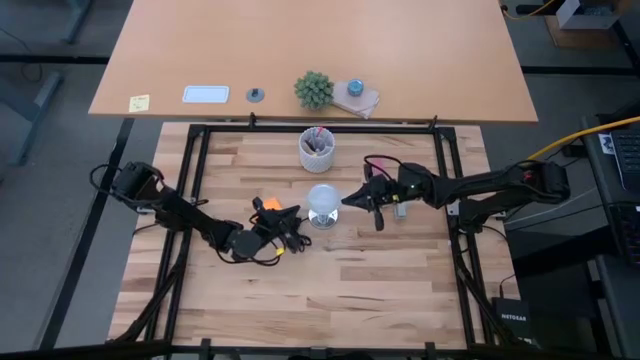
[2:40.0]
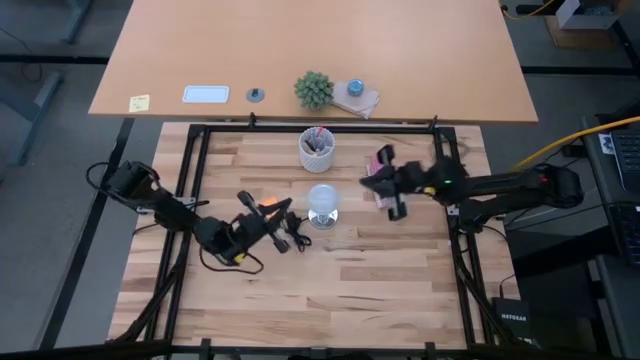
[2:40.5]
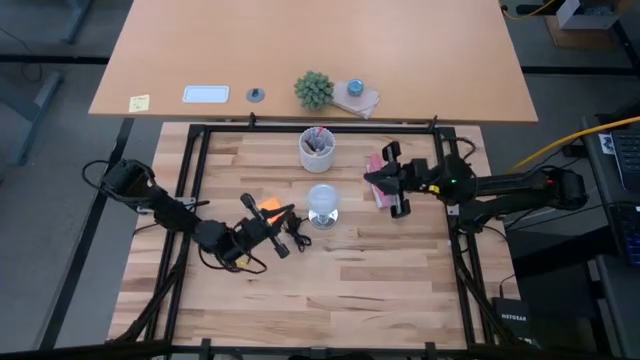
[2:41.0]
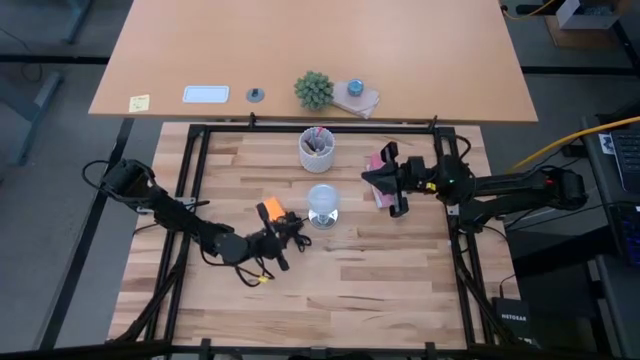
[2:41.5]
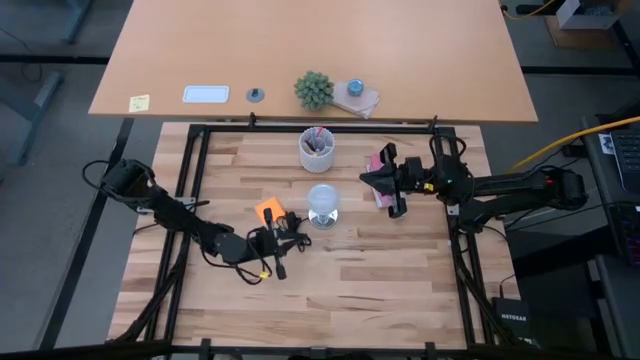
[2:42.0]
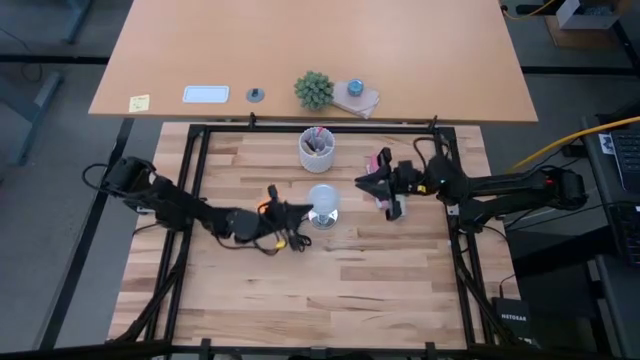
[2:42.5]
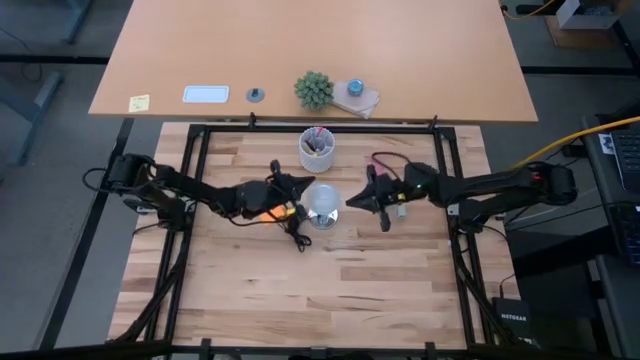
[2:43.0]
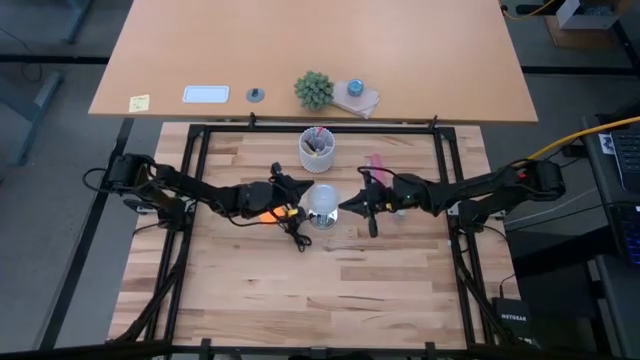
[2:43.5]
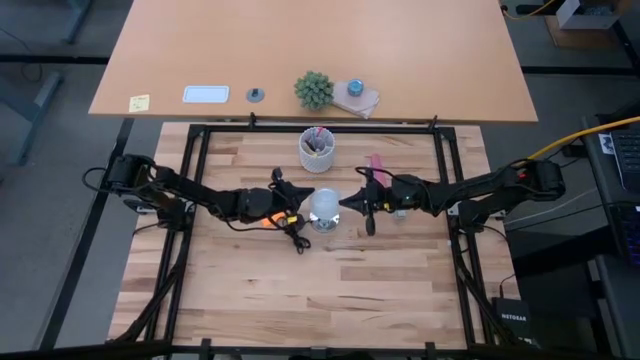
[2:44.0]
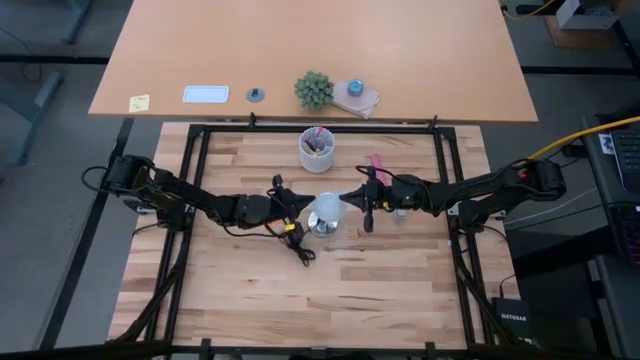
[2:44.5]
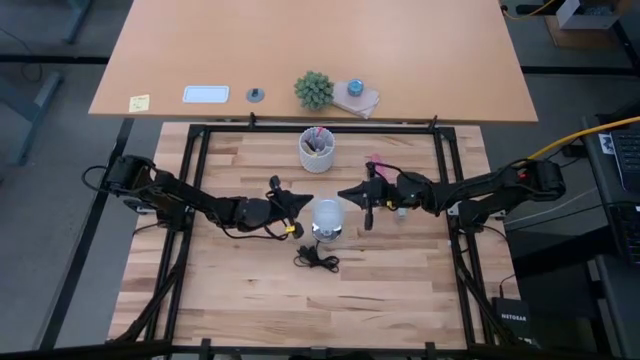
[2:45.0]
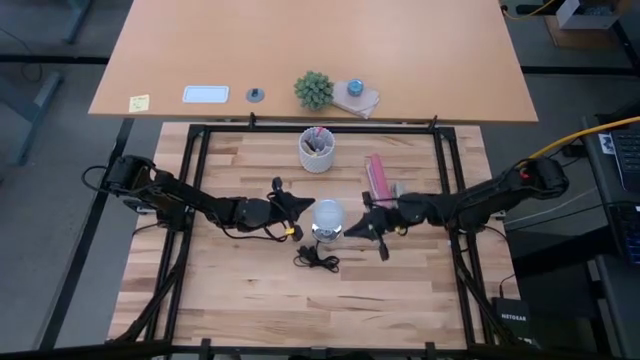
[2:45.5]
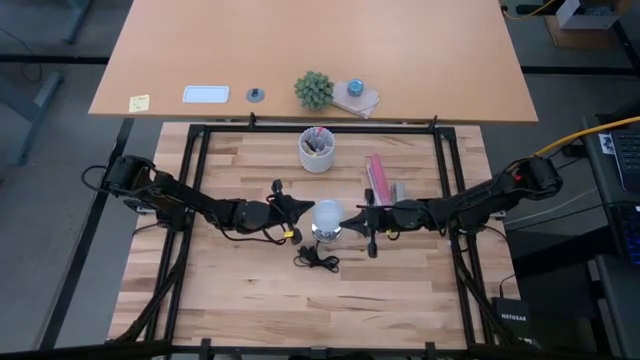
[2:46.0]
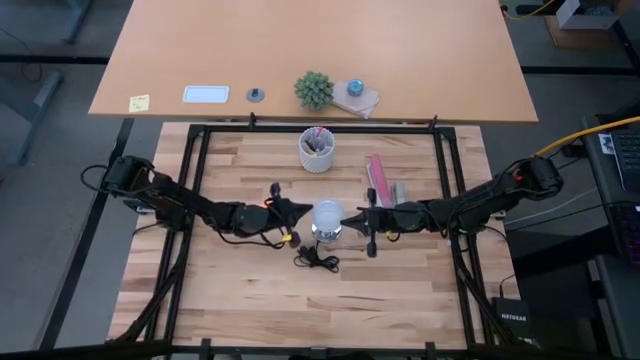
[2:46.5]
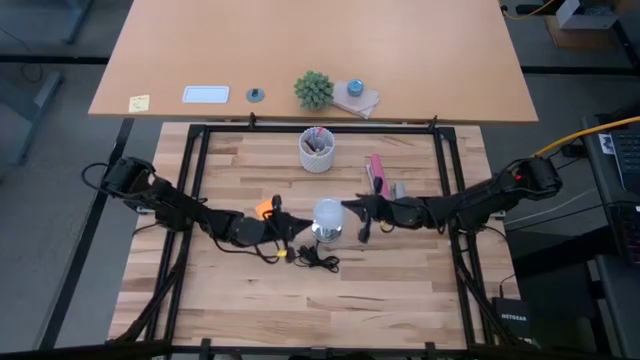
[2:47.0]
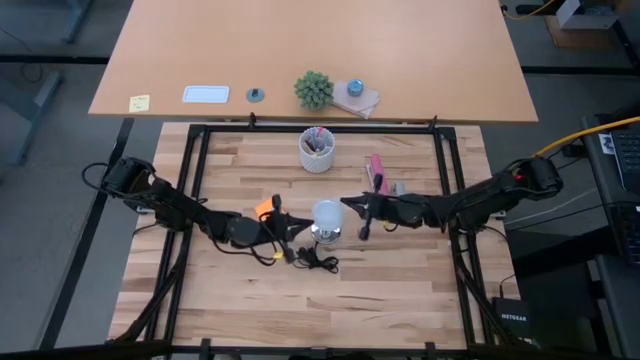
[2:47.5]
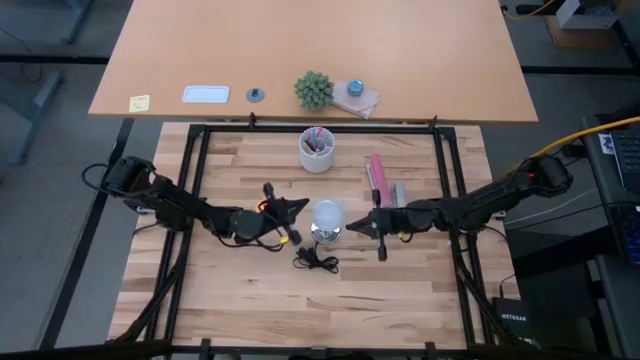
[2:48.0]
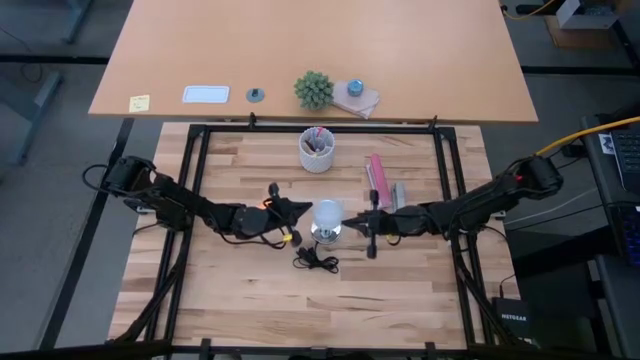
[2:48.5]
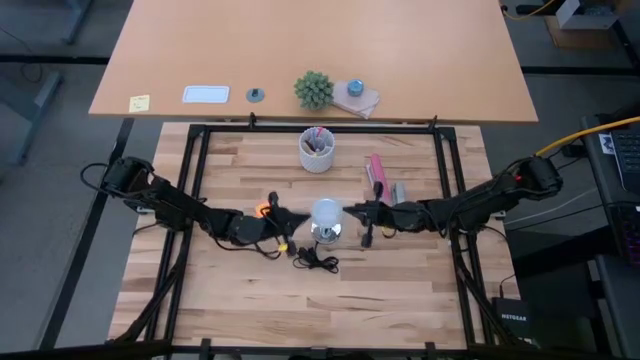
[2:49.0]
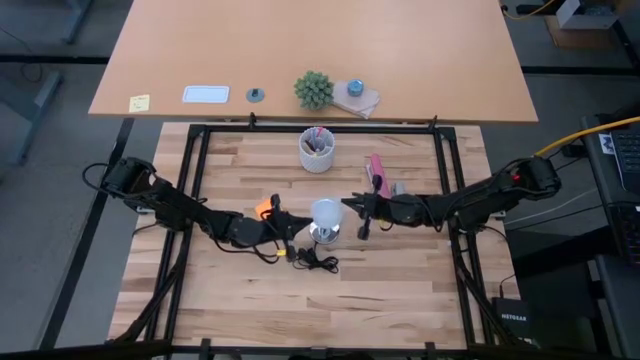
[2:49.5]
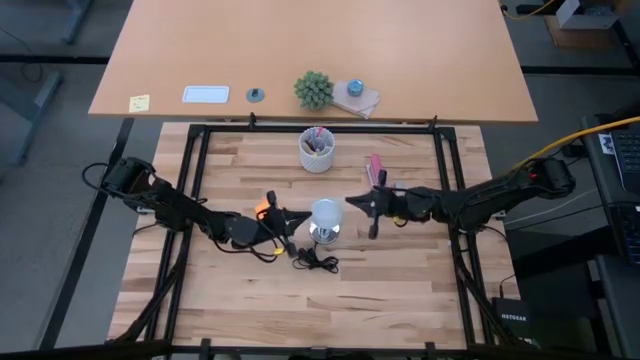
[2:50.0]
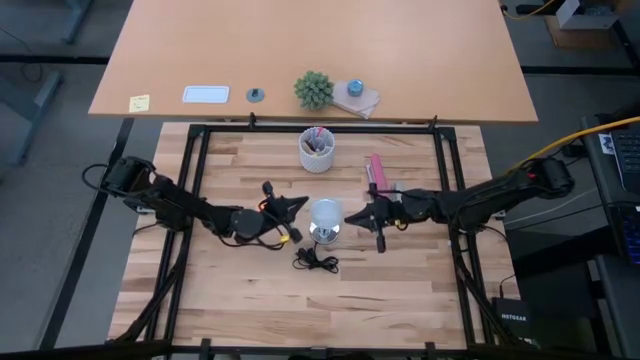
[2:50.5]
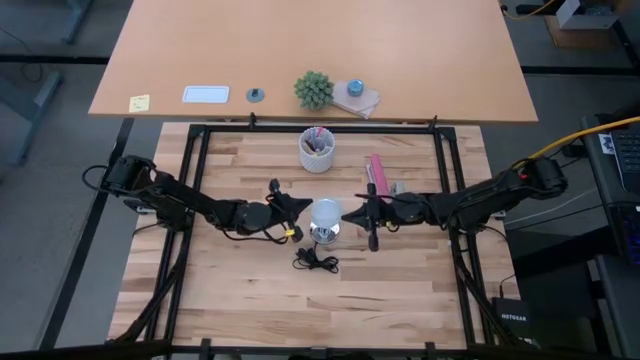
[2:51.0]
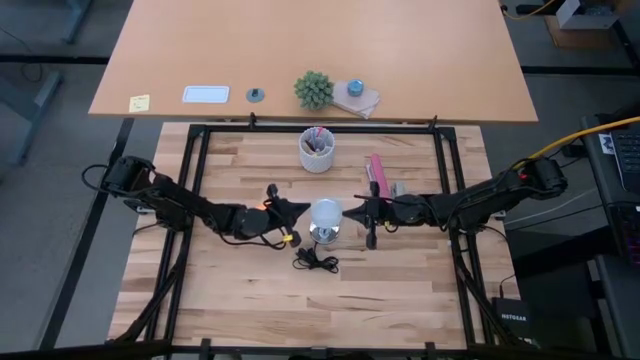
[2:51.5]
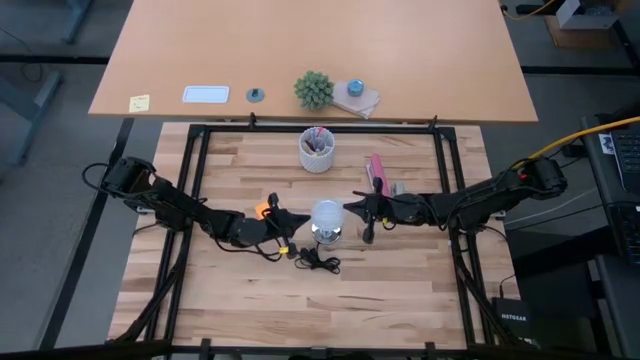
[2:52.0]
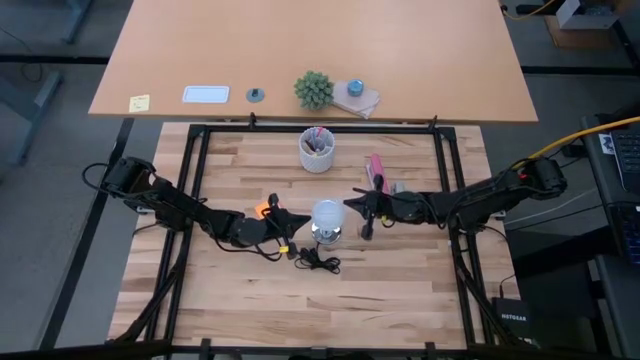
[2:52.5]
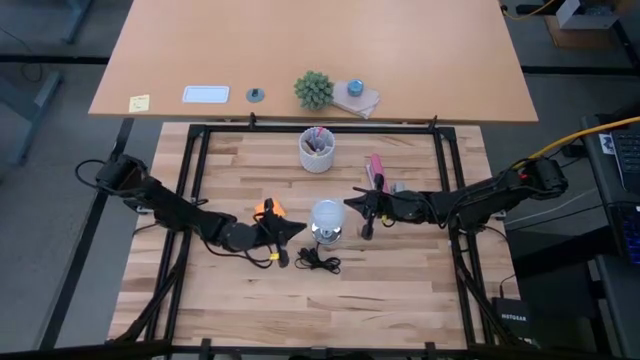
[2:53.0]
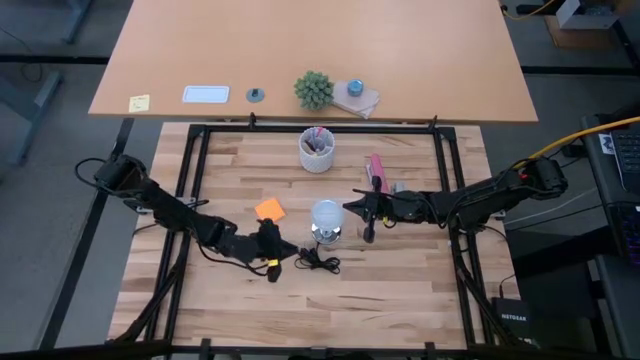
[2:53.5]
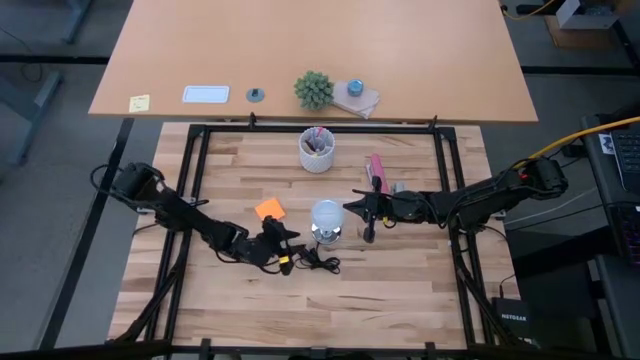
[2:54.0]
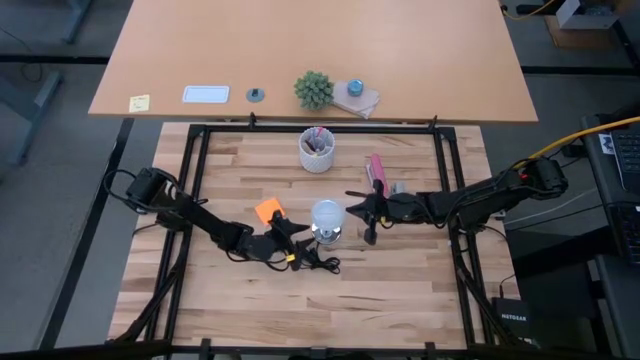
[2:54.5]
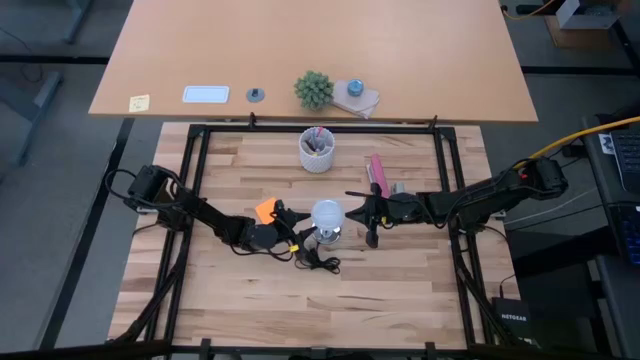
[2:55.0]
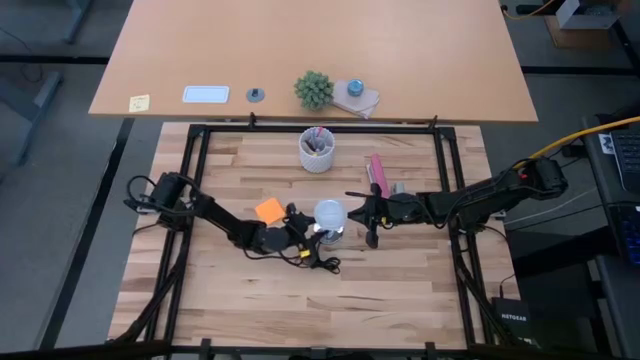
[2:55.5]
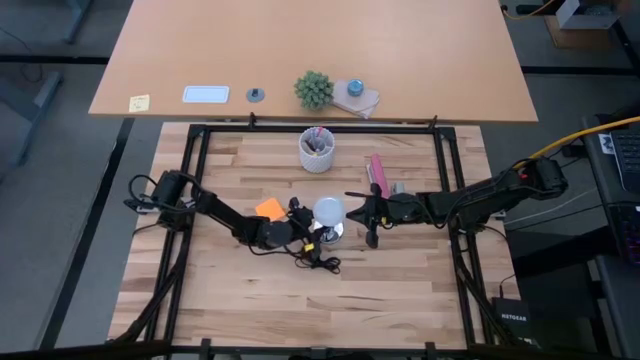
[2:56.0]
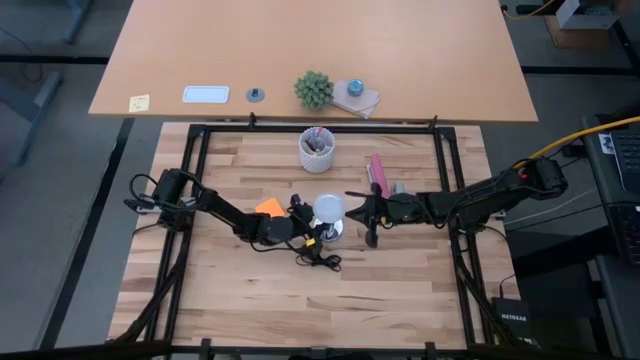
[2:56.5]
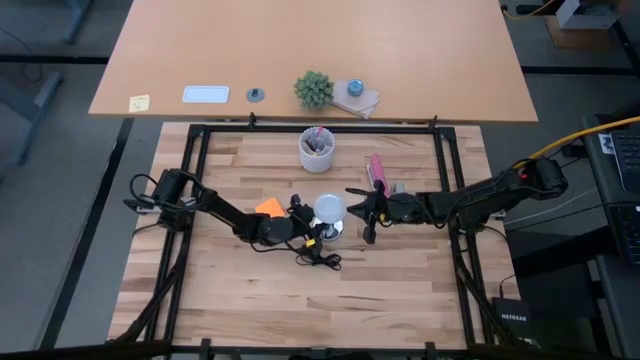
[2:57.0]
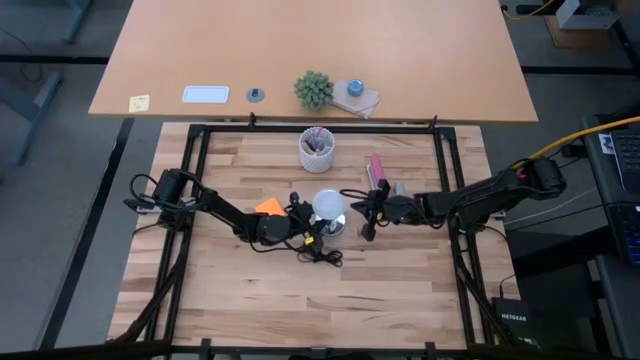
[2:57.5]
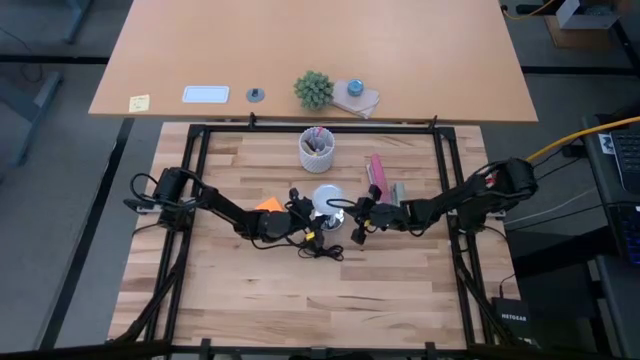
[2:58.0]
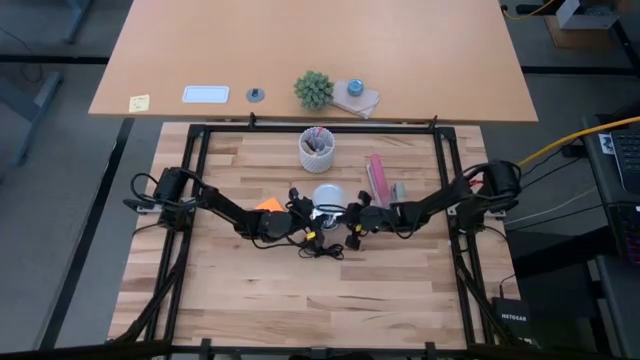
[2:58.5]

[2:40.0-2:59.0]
Task: Screw lightbulb
Remove the lightbulb from the lamp
